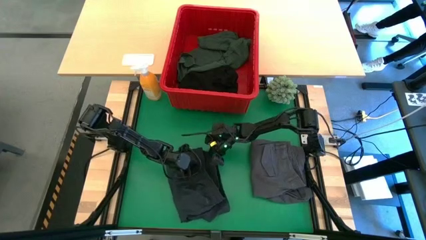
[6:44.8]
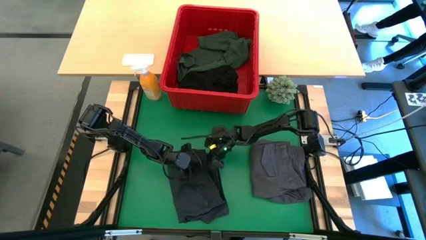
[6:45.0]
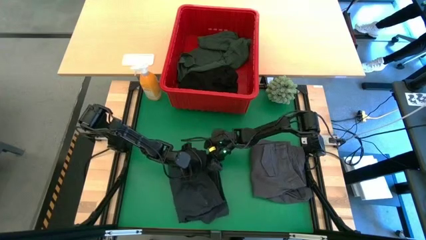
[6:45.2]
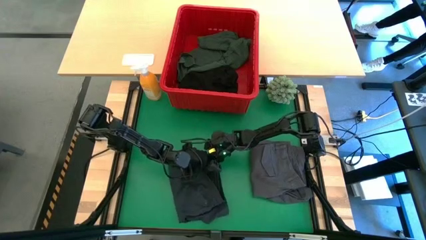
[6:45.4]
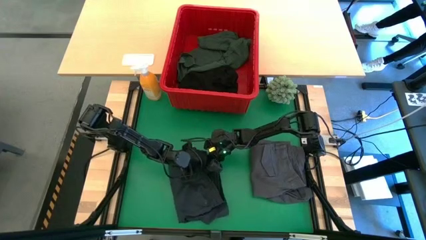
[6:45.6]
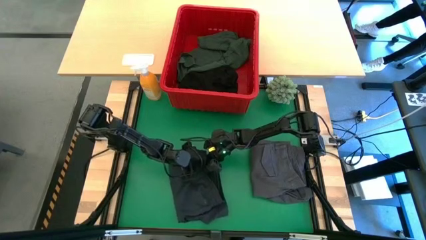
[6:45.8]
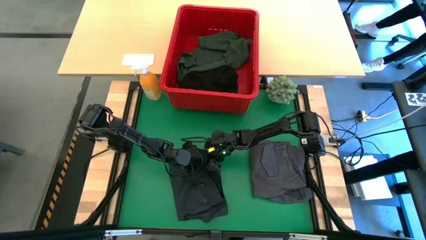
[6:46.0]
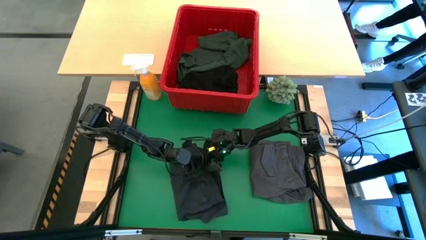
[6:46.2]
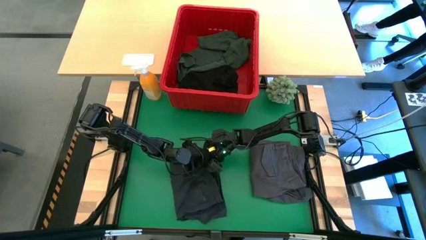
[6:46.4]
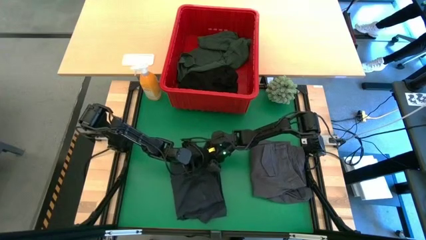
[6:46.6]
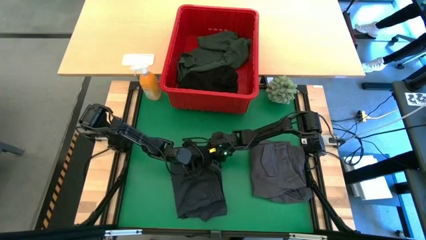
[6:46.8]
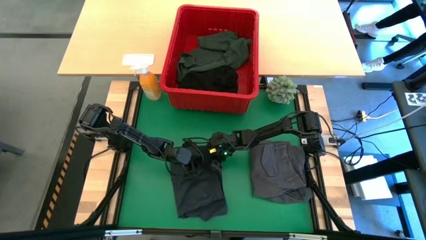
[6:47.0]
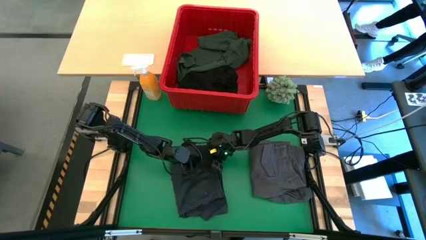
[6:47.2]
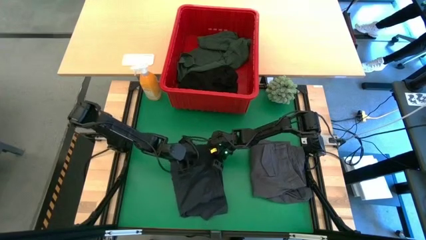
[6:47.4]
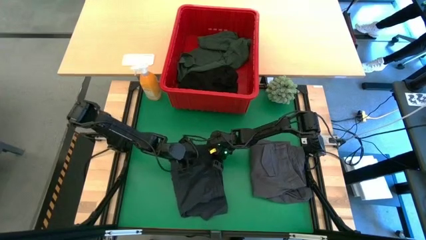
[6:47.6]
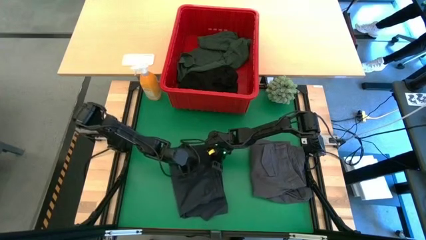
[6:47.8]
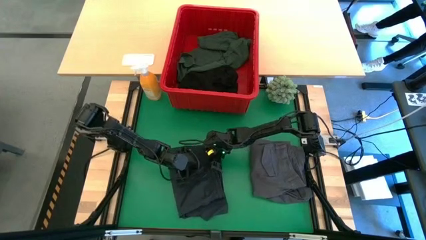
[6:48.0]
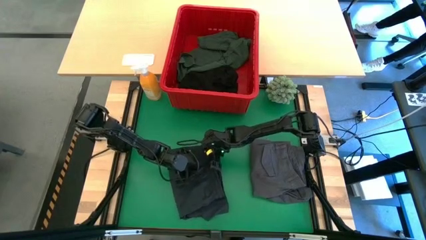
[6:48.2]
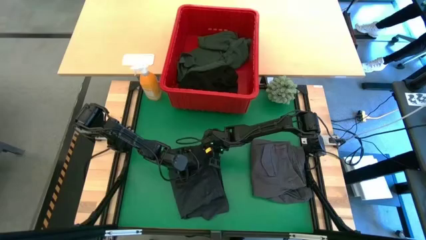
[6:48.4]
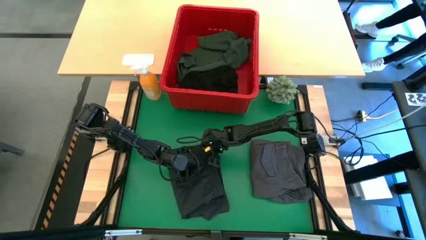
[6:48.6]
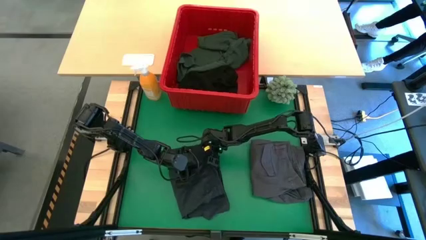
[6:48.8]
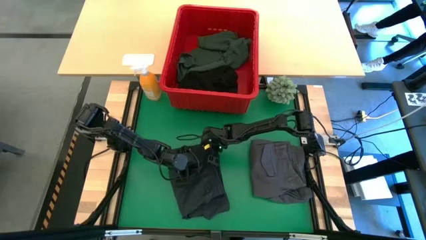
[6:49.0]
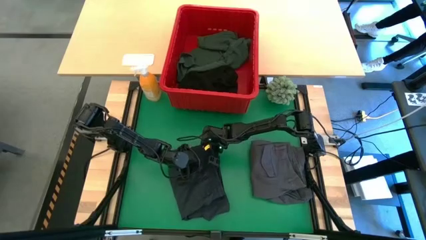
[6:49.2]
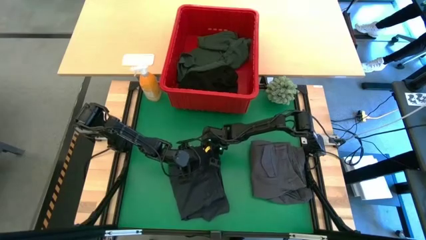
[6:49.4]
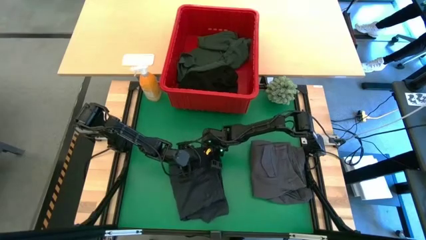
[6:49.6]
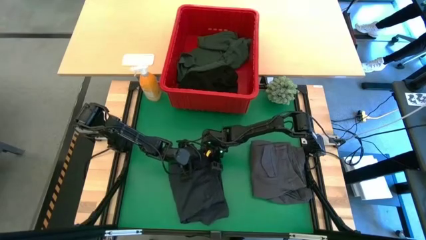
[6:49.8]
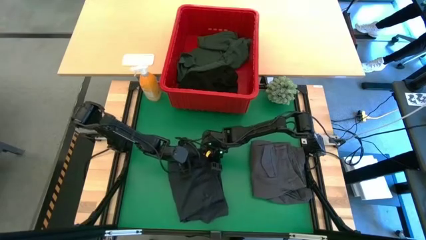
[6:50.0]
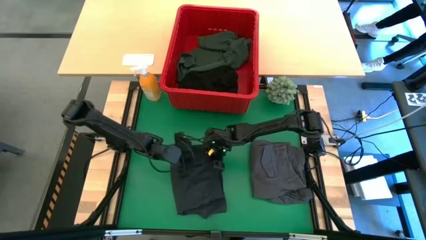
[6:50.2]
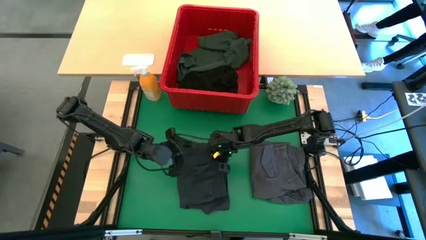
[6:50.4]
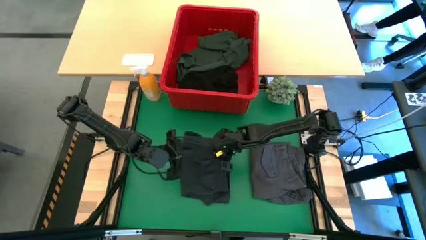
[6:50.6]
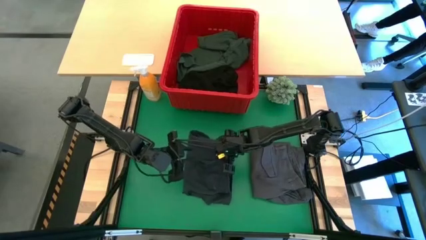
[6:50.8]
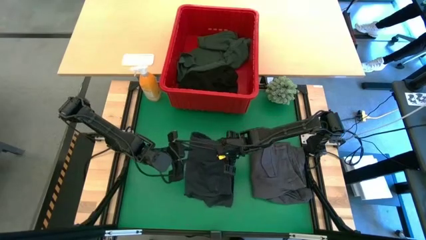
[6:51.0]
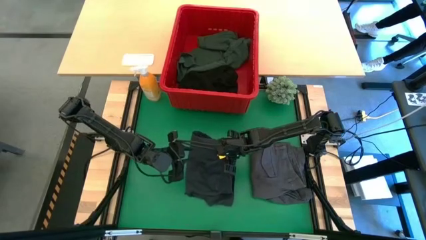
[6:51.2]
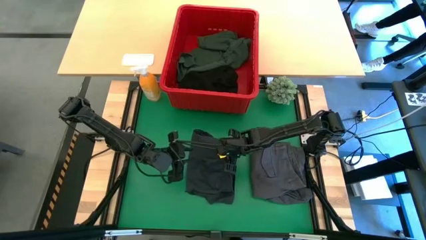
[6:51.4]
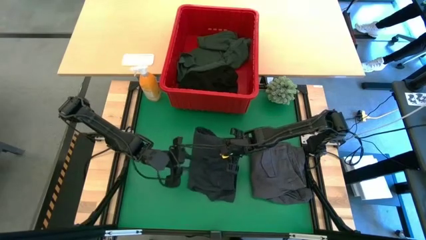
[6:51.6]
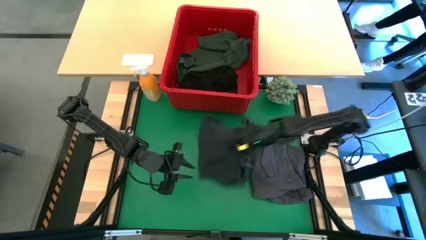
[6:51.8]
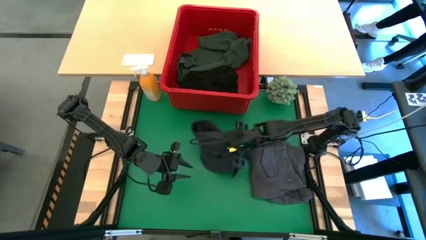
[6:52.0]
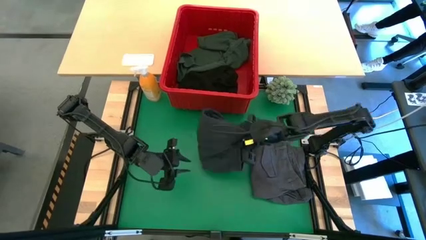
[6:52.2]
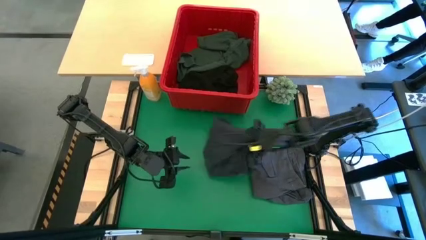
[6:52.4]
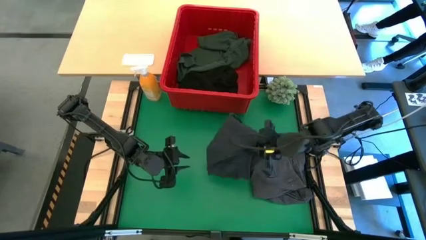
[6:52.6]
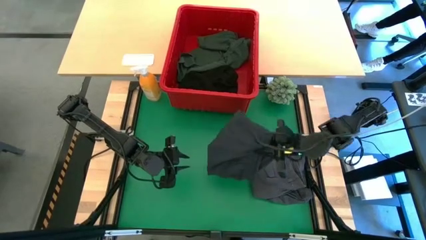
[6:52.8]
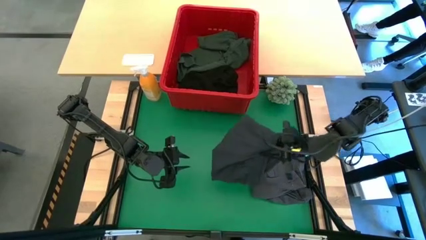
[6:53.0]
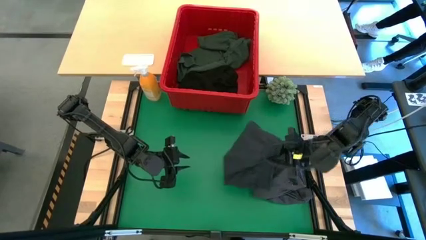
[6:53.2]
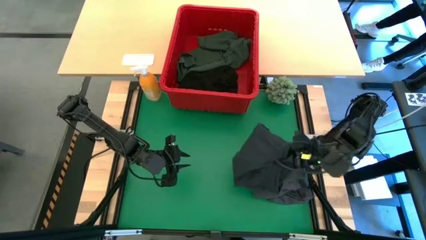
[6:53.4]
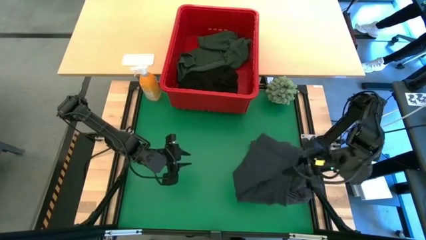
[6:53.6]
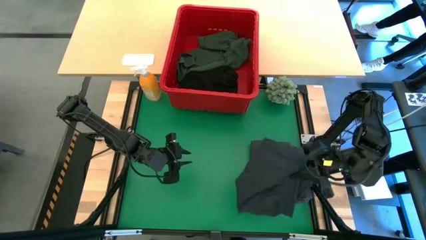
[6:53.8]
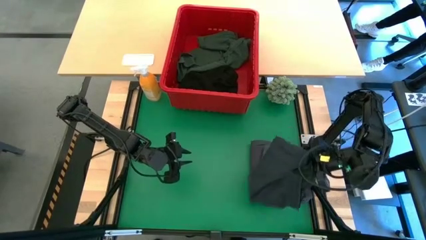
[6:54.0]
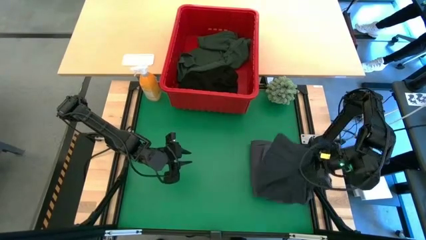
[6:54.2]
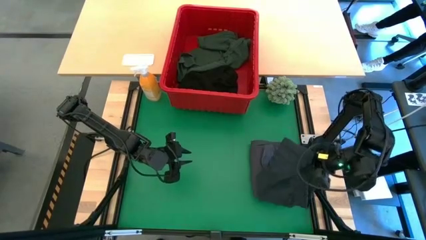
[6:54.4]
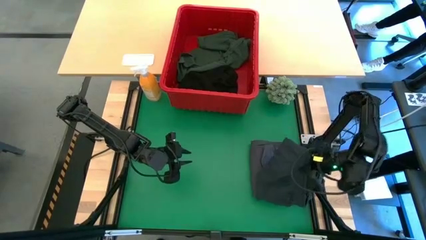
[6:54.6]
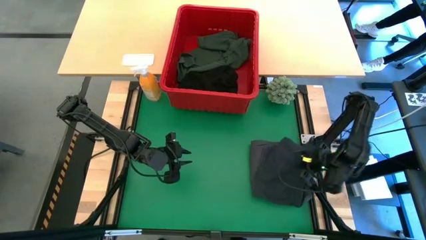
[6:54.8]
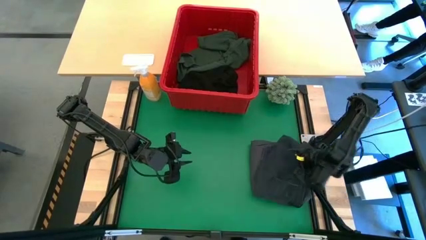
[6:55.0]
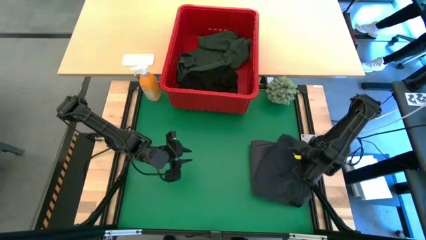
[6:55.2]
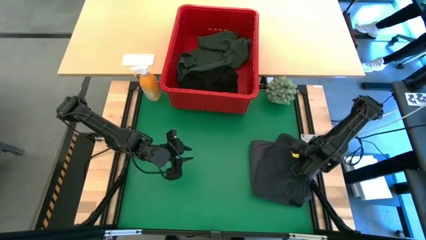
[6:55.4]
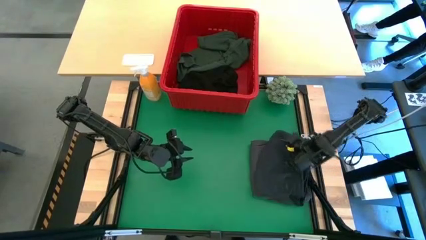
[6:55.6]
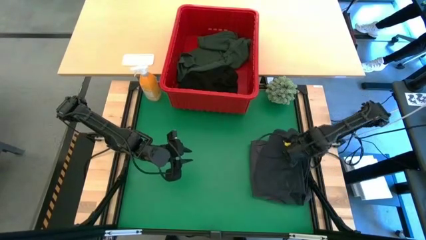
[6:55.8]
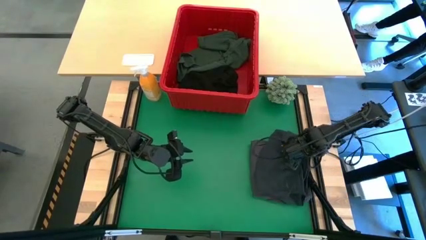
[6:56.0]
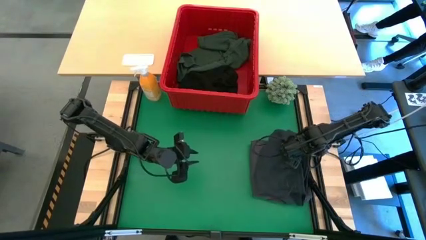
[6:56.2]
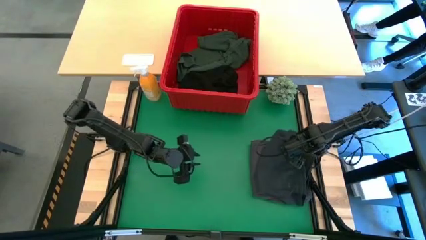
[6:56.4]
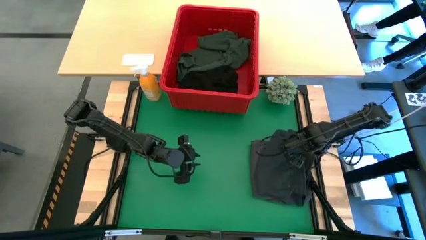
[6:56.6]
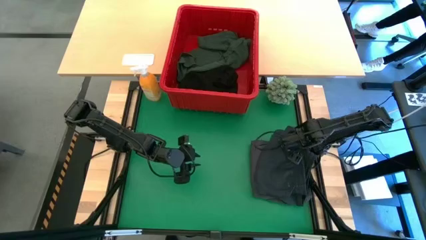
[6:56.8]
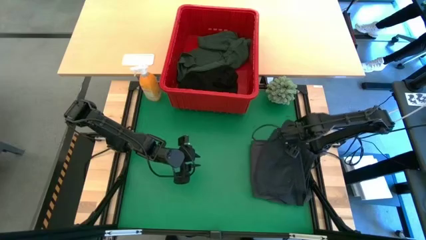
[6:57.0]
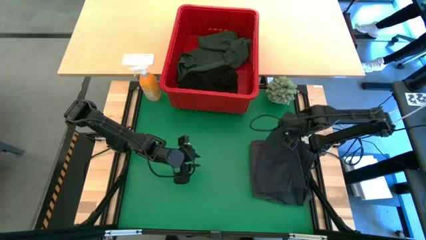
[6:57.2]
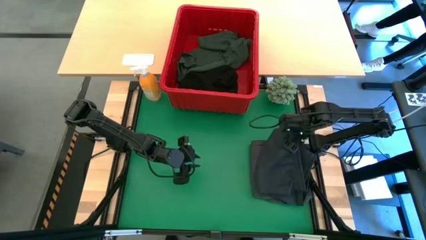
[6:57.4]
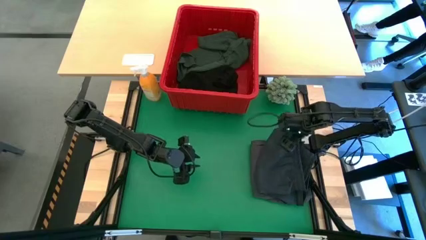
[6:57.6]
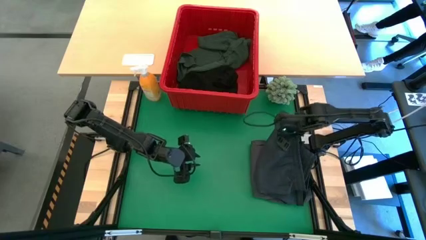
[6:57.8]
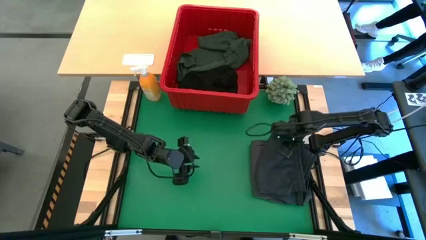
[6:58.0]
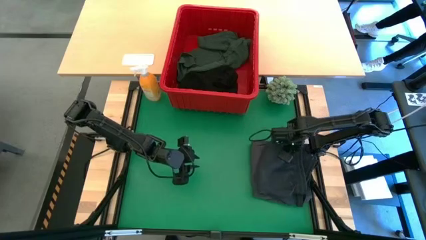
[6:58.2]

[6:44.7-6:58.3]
Task: Fold Laundry from Bin
Stack the dark gray short on top of gray short

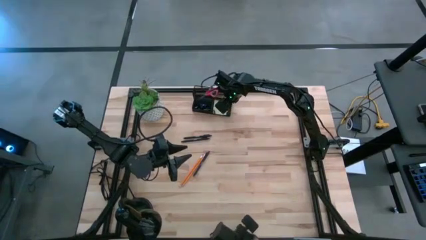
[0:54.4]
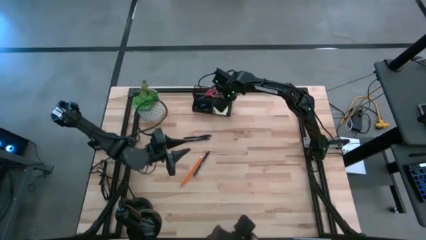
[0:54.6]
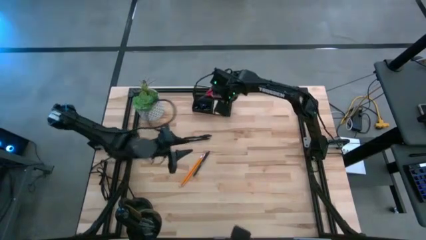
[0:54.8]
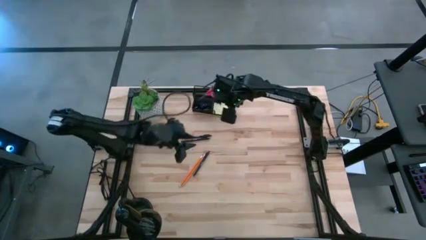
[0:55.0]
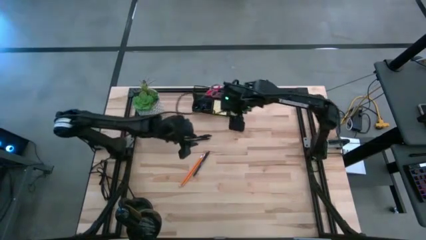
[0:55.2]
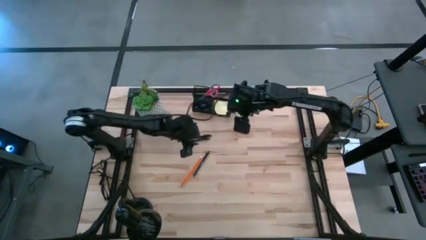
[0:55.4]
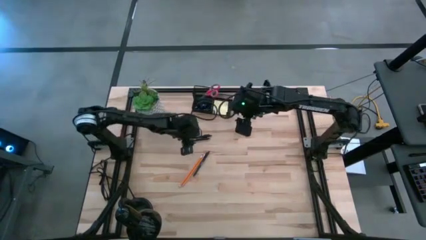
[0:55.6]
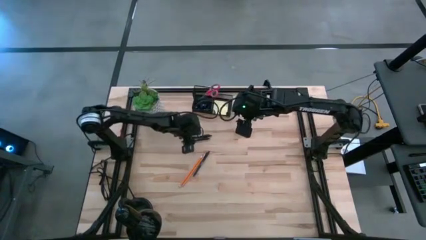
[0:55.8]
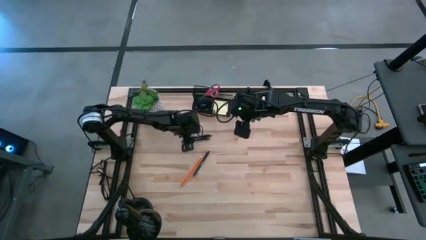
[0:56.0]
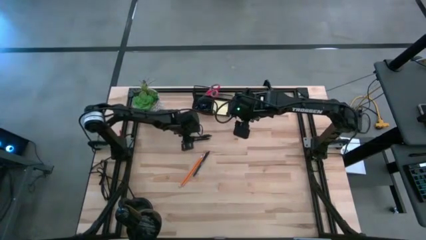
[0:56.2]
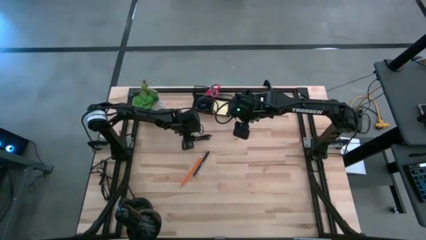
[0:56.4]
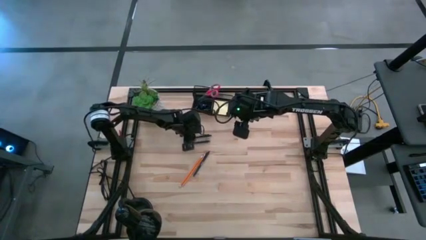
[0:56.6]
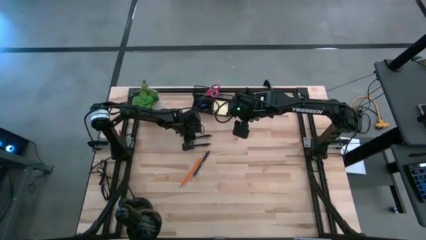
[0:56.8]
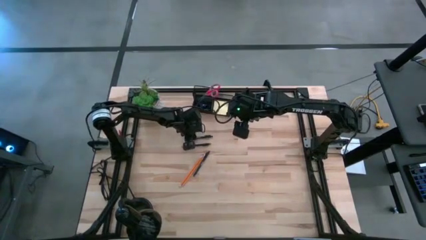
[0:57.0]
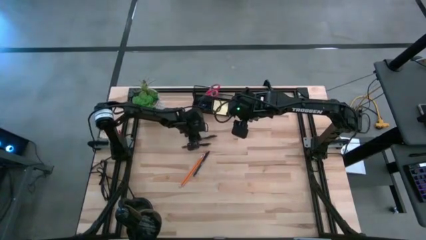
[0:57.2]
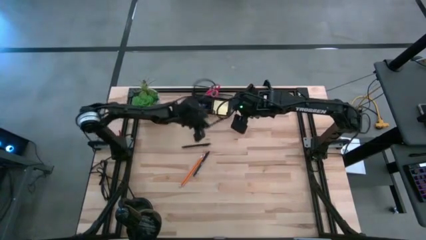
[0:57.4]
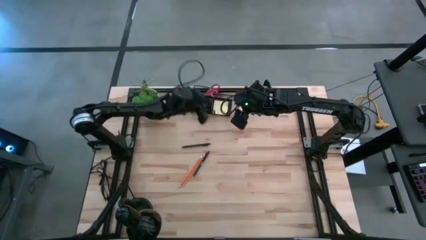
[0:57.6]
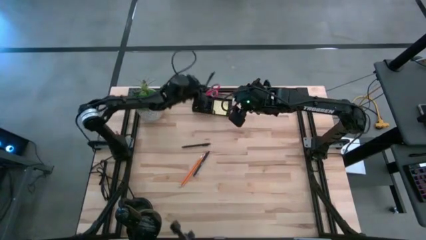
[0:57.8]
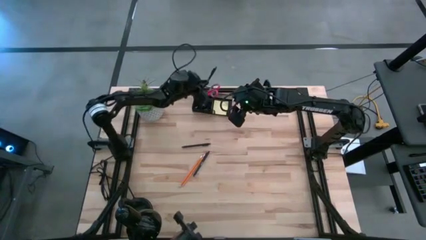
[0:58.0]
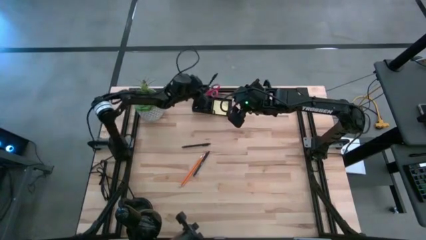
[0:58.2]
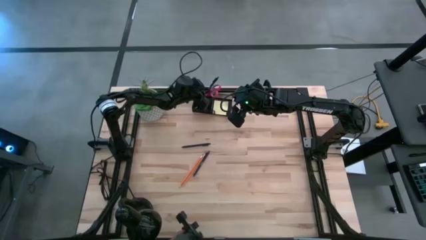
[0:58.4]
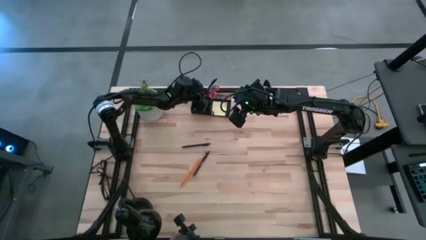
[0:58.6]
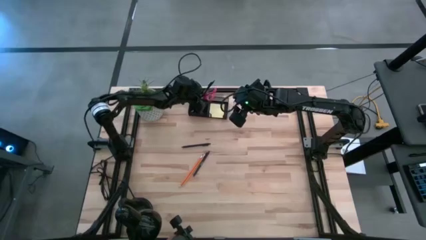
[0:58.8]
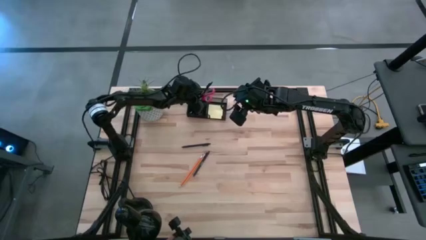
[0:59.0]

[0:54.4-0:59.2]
Task: Pick and place office supplies into organizer
Put the top pen into the top left section of the black desk organizer
